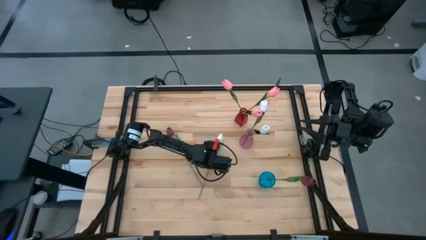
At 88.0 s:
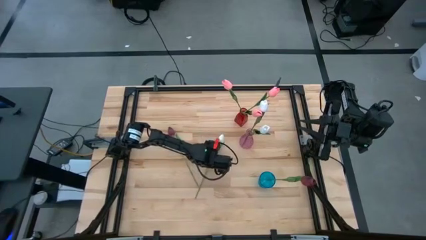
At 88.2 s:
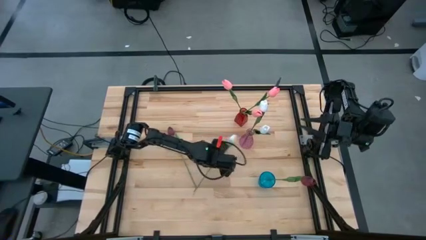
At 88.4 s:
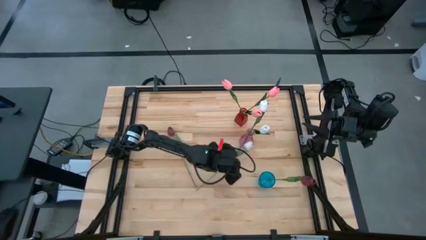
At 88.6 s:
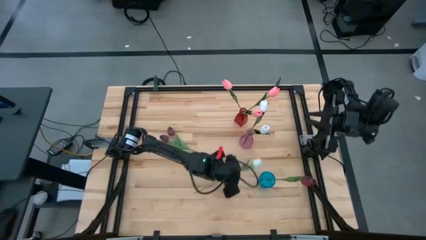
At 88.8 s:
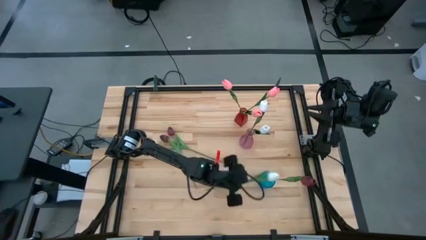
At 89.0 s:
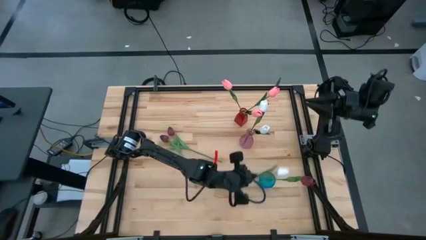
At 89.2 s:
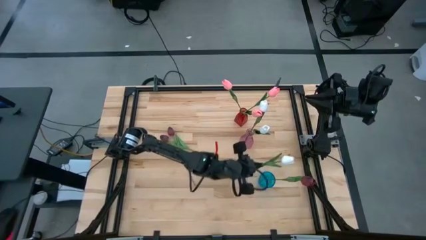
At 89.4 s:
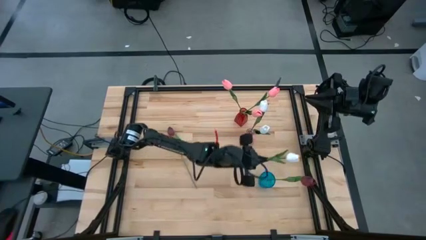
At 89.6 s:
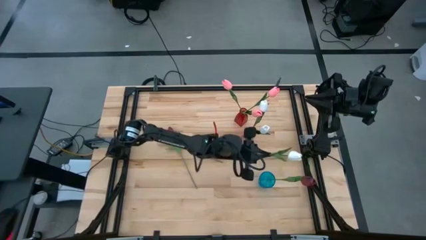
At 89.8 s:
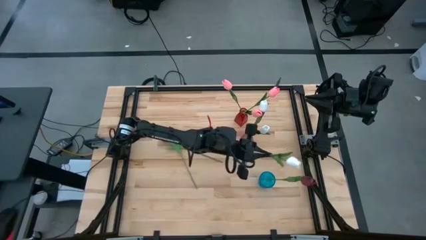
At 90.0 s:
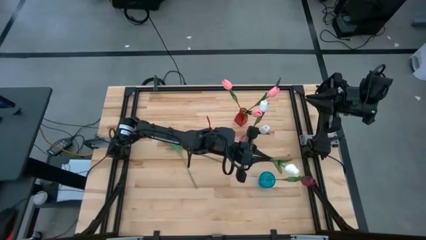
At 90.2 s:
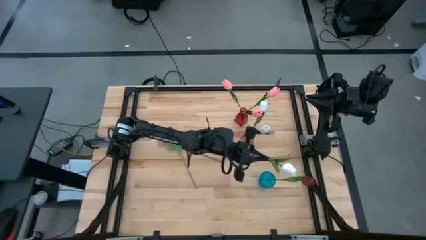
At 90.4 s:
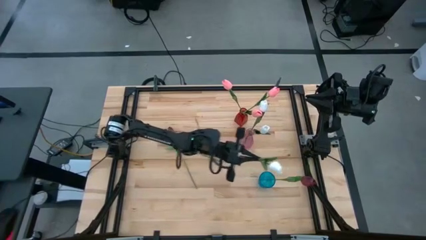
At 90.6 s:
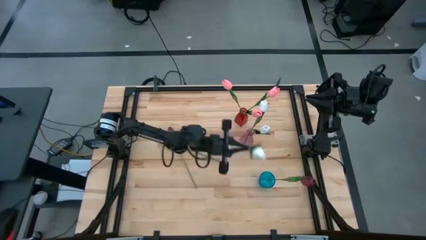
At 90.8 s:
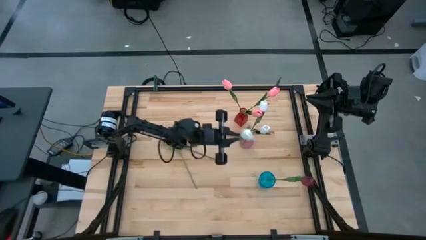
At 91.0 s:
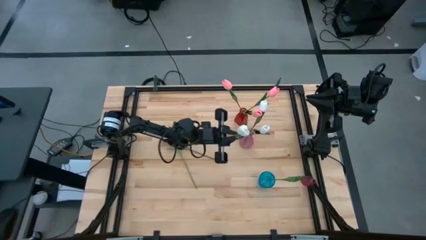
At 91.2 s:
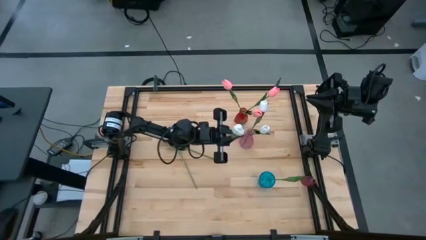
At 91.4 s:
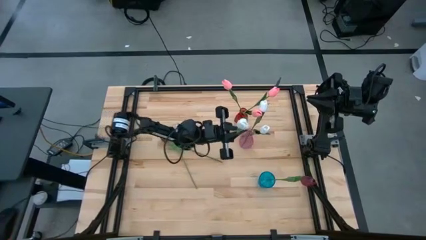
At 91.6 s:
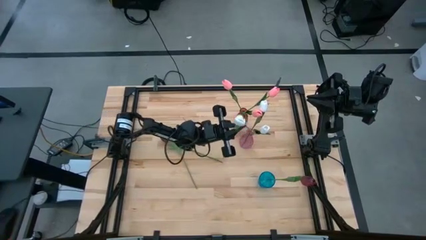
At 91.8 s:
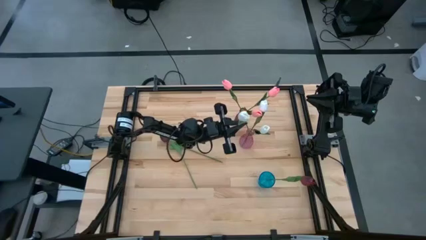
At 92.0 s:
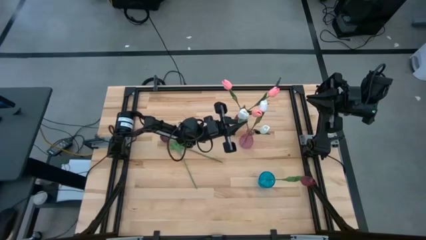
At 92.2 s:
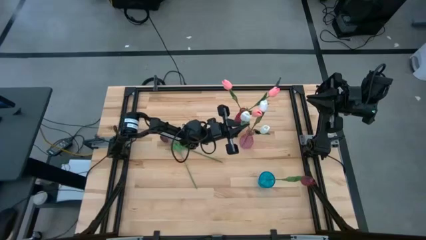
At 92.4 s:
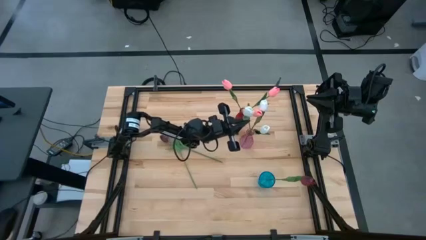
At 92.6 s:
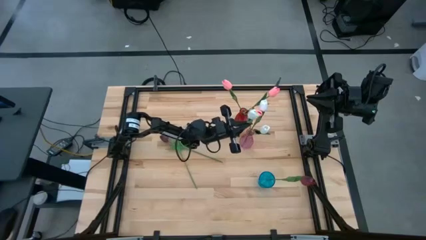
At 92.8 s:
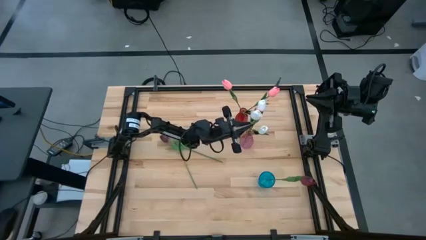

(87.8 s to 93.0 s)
Task: Sort flowers into vase by color
Put the white tulip into the pink vase

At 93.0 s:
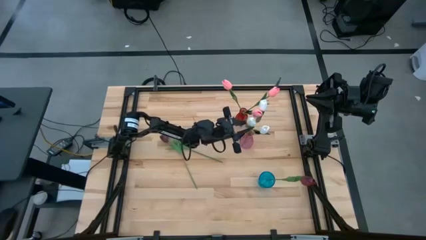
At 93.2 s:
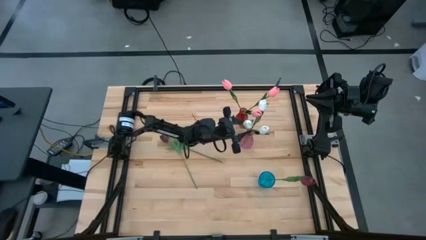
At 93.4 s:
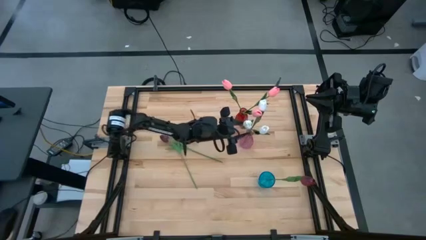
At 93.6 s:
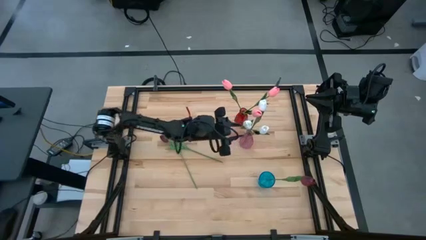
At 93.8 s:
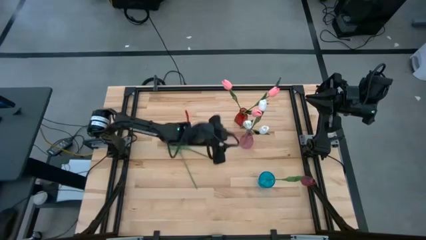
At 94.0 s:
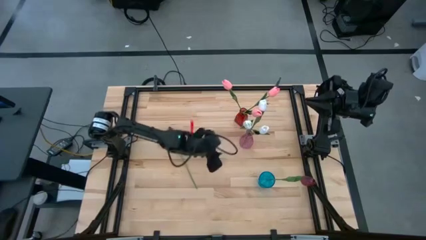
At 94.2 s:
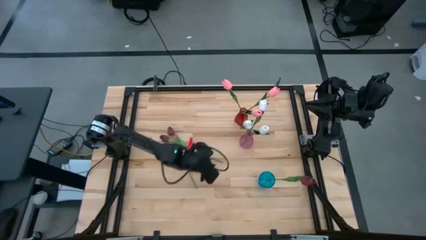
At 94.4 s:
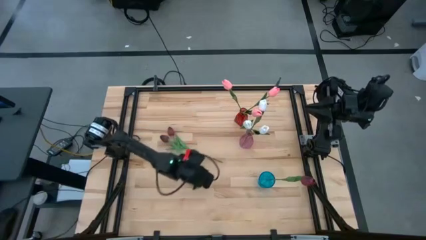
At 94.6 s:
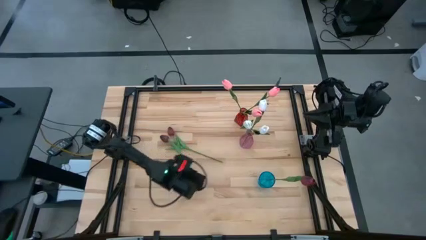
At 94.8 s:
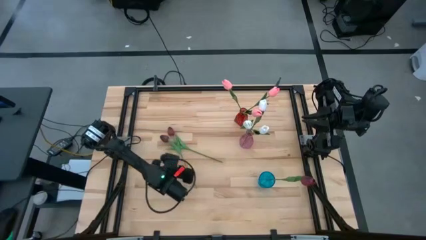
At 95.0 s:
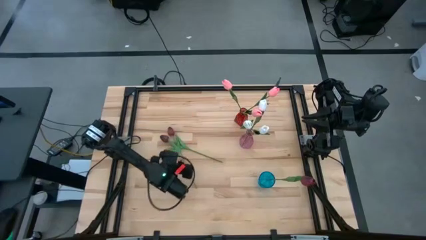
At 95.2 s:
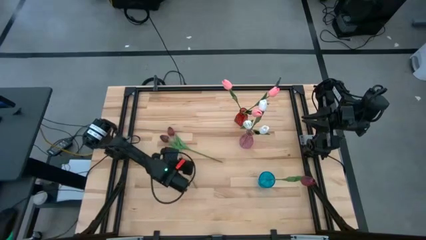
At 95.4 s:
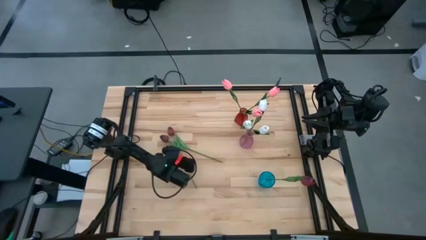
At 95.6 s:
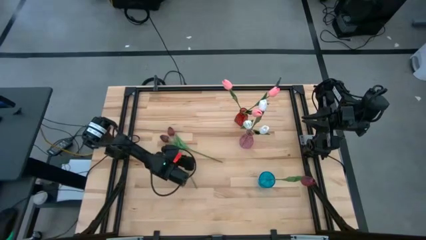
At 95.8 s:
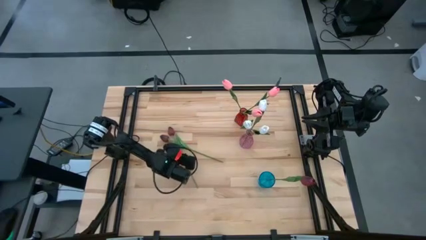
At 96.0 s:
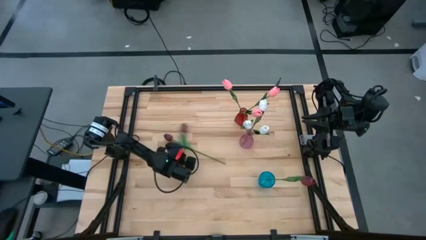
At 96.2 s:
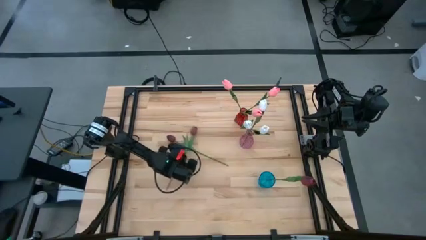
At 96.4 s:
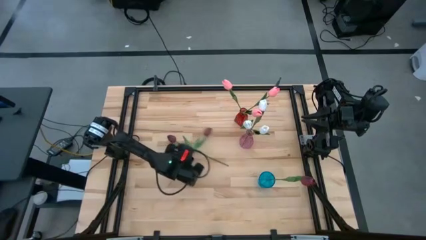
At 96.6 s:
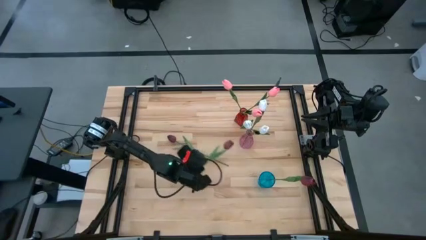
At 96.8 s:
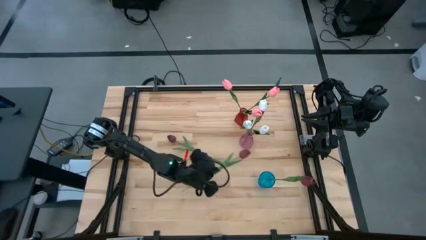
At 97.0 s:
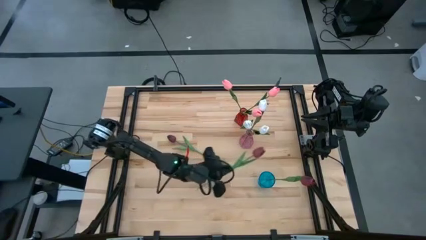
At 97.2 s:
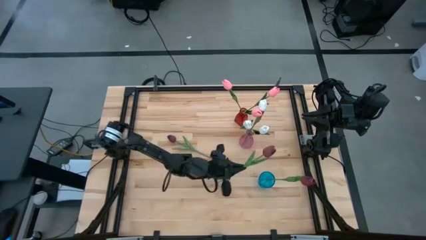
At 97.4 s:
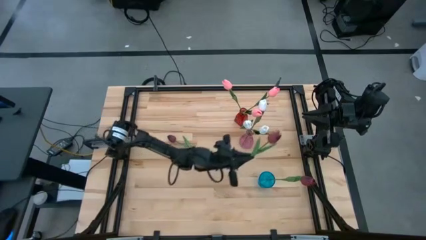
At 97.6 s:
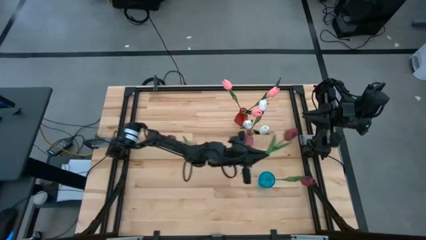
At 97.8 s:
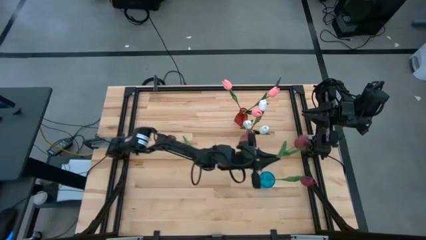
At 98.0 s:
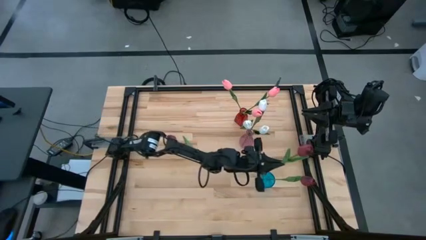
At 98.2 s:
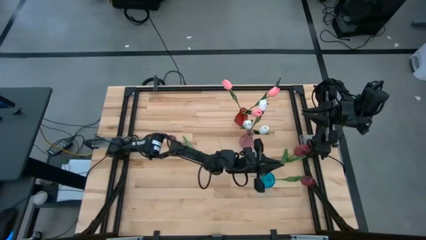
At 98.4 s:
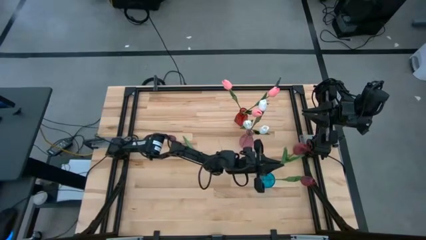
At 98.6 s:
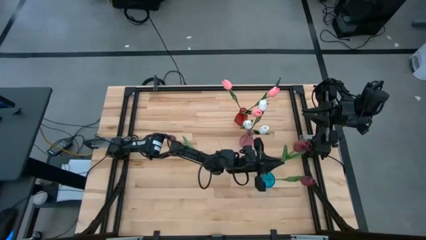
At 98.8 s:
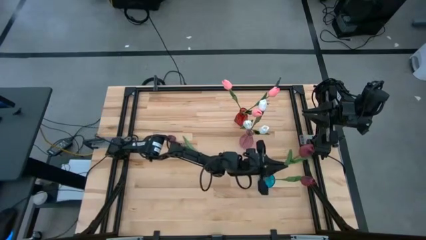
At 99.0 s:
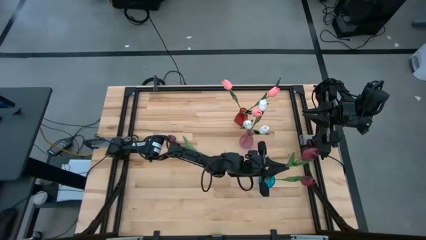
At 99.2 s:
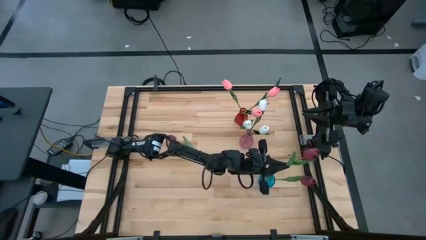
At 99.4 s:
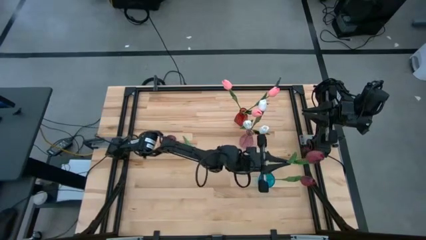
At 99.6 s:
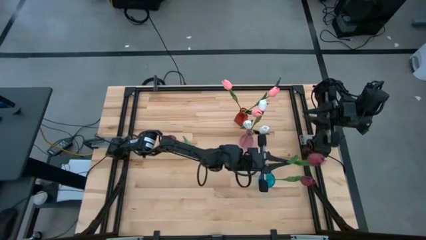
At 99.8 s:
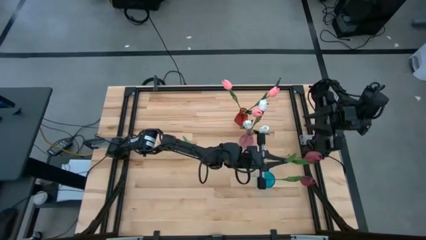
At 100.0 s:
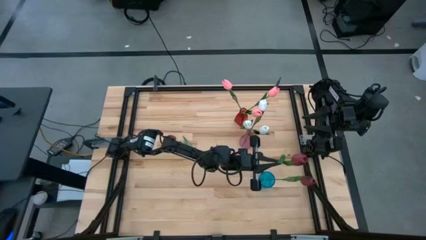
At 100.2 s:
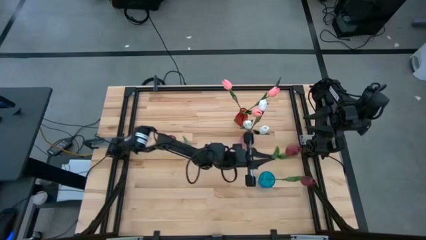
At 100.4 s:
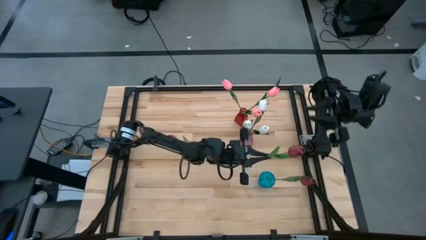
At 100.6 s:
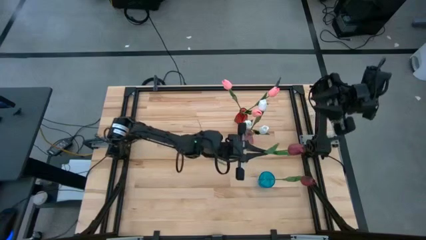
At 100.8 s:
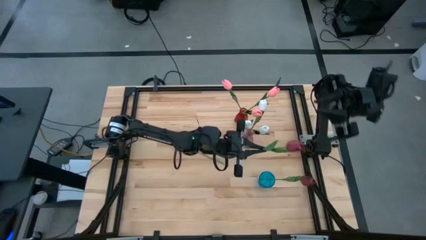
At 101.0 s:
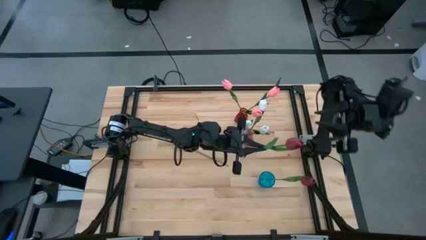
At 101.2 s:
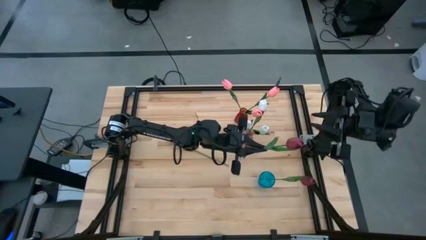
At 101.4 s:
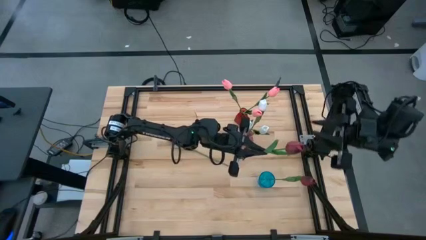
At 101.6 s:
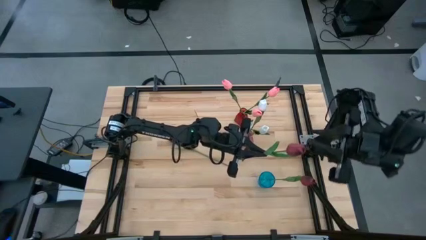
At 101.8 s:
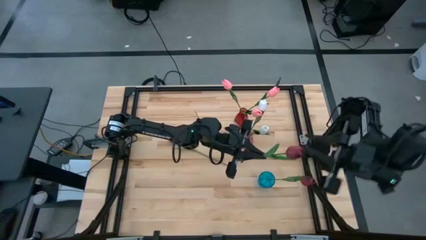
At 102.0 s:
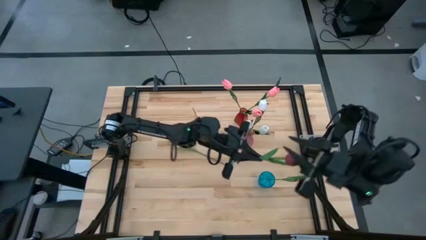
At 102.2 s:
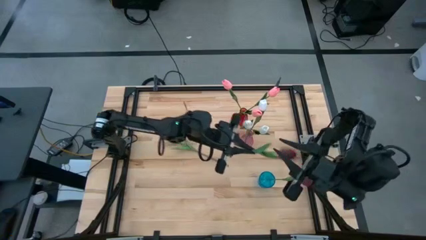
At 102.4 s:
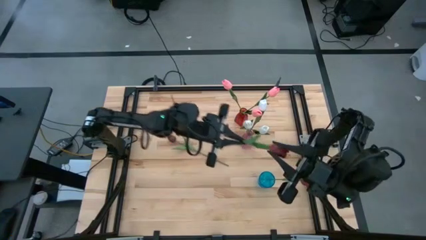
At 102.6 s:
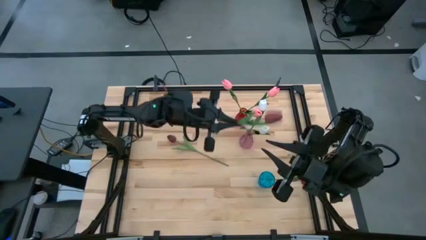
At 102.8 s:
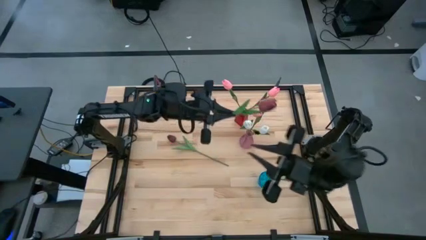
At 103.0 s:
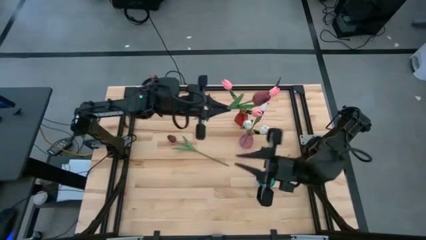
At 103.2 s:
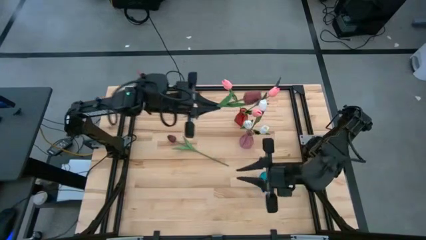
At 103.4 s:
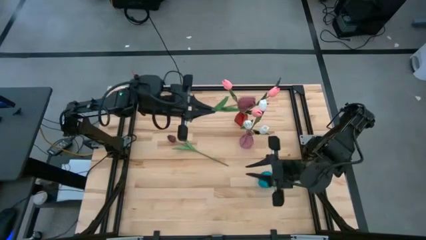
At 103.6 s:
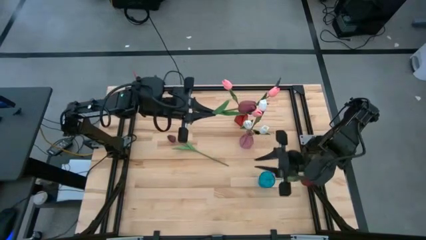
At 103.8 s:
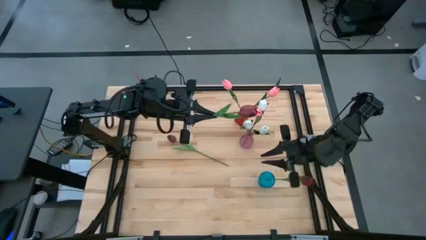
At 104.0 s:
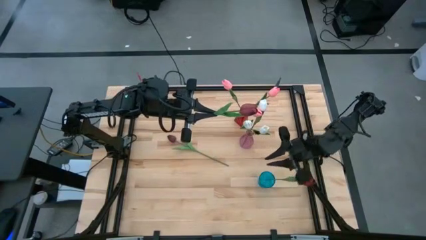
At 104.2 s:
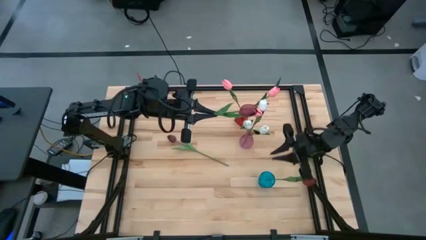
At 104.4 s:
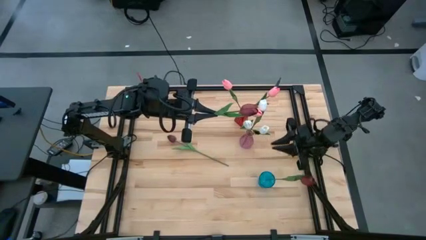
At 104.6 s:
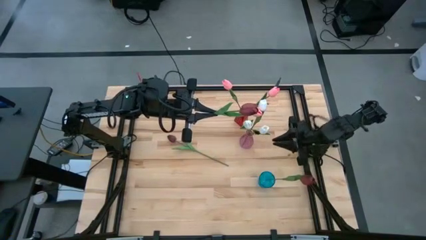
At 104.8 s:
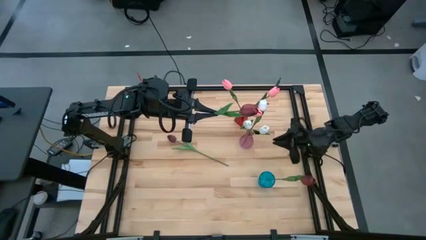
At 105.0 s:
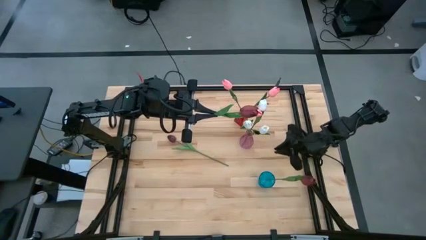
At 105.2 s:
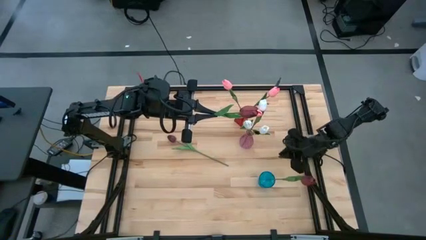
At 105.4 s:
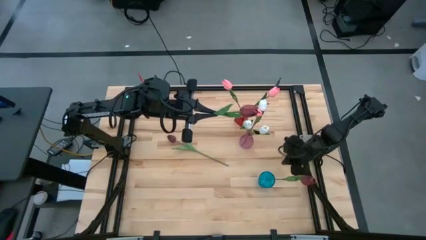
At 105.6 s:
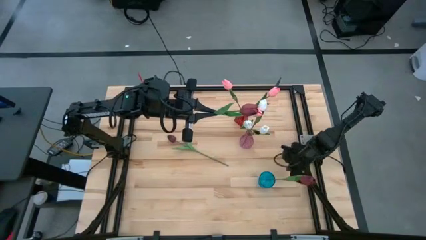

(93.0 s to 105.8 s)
Put the right red tulip into the blue vase
